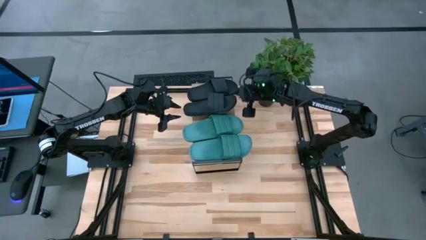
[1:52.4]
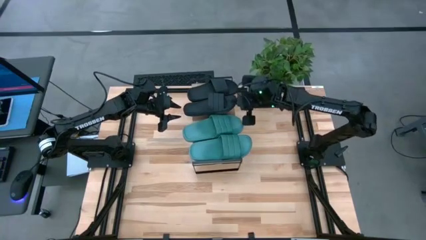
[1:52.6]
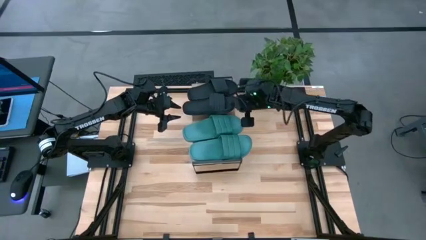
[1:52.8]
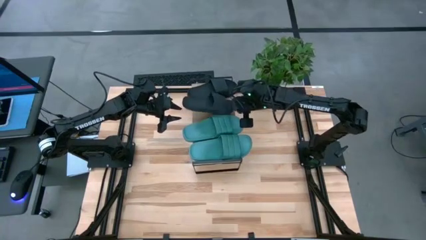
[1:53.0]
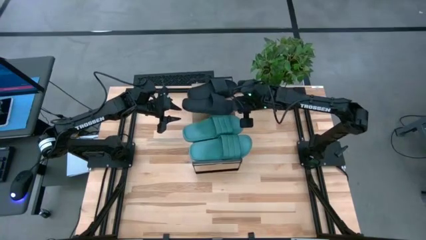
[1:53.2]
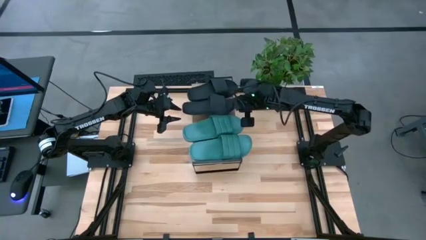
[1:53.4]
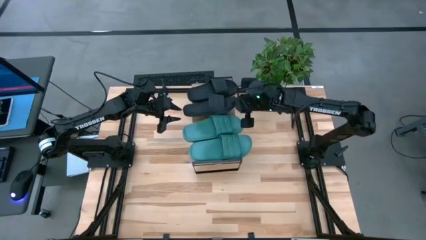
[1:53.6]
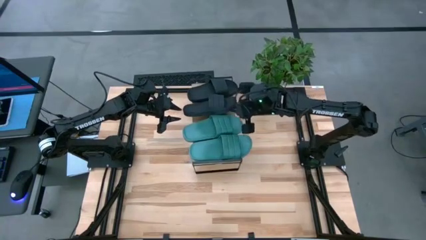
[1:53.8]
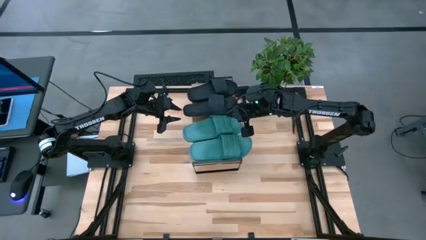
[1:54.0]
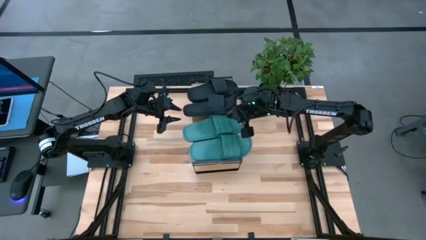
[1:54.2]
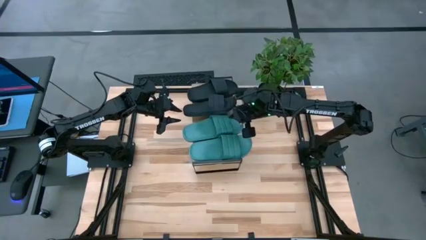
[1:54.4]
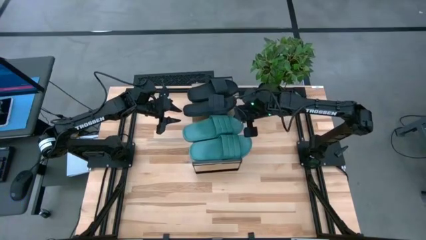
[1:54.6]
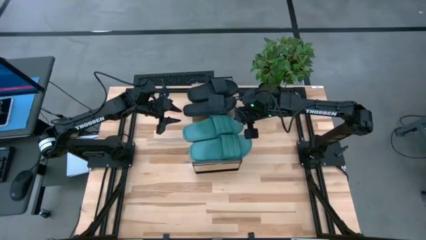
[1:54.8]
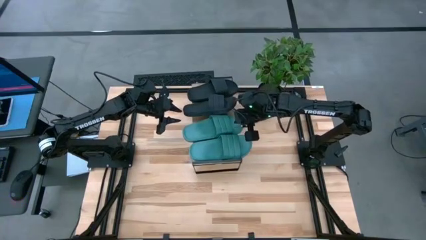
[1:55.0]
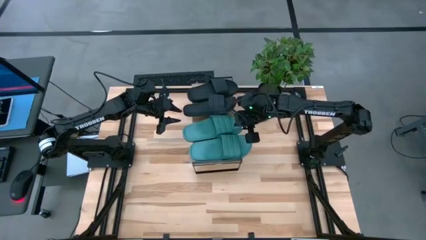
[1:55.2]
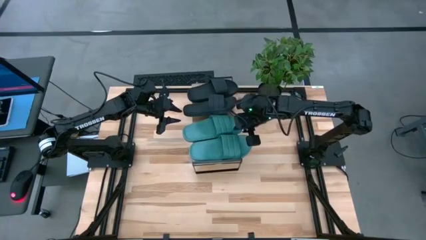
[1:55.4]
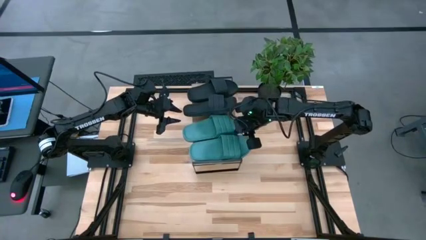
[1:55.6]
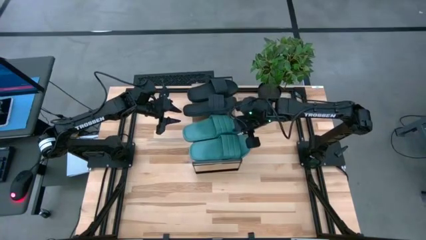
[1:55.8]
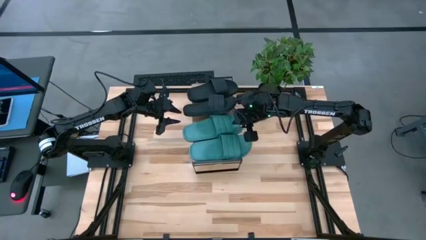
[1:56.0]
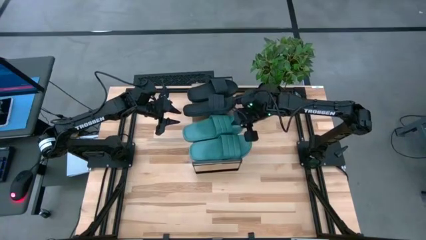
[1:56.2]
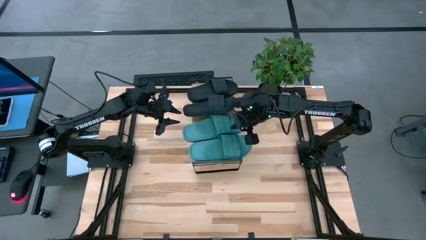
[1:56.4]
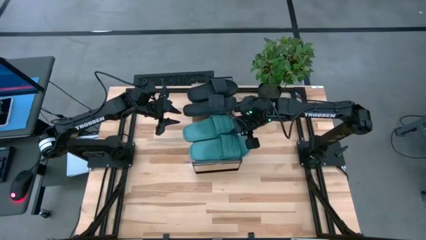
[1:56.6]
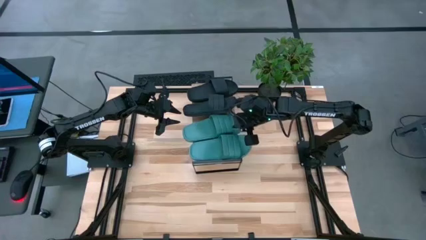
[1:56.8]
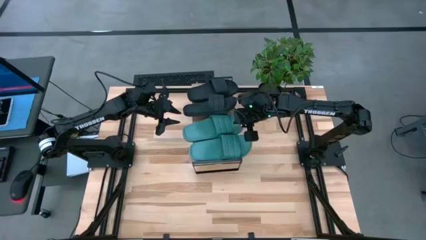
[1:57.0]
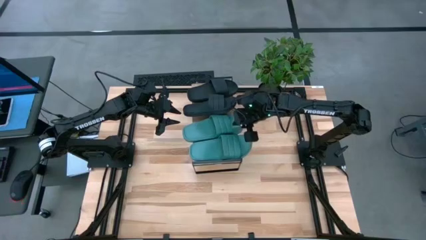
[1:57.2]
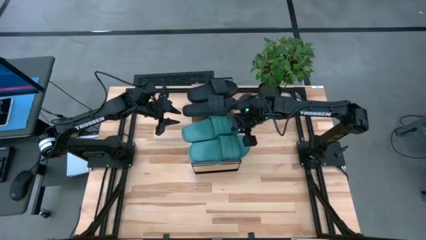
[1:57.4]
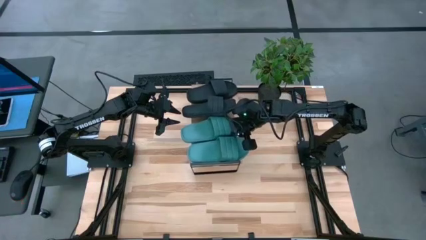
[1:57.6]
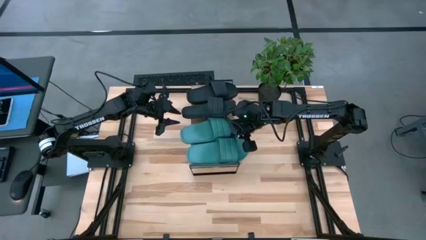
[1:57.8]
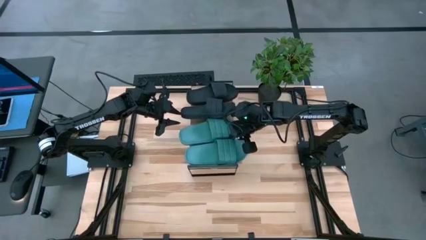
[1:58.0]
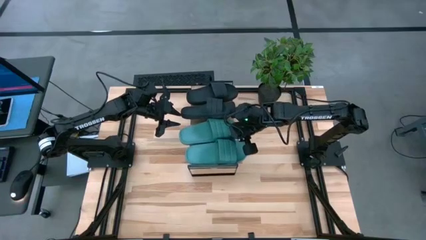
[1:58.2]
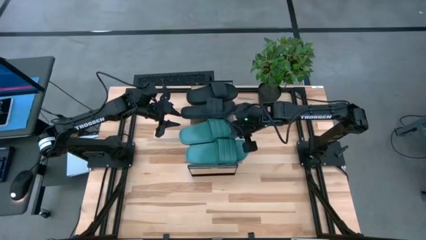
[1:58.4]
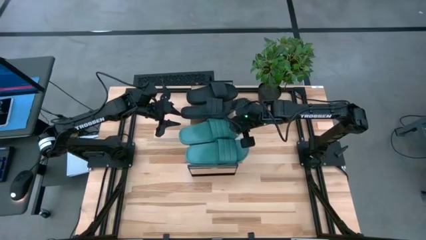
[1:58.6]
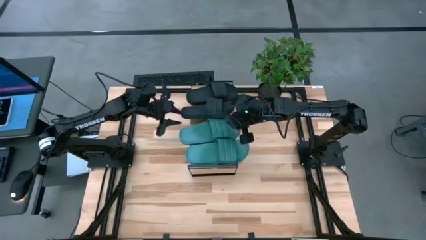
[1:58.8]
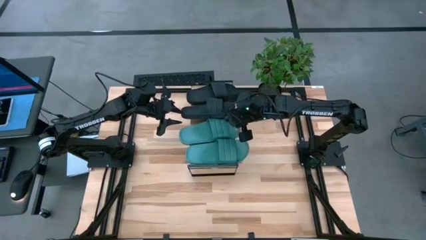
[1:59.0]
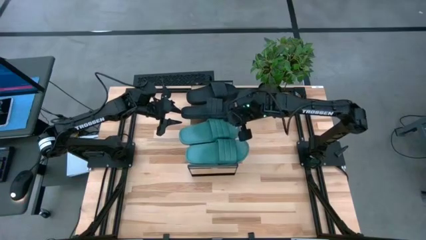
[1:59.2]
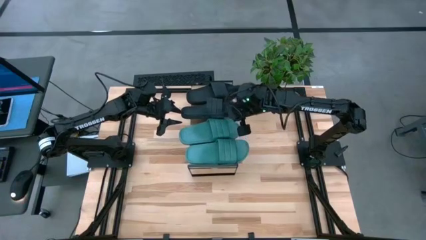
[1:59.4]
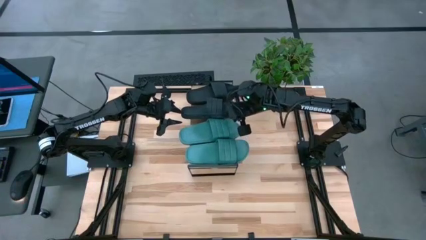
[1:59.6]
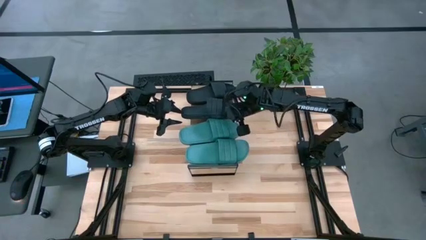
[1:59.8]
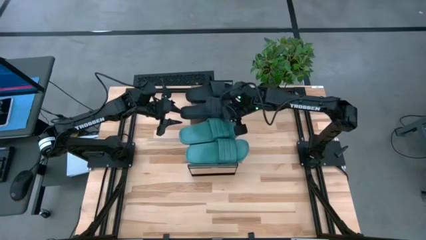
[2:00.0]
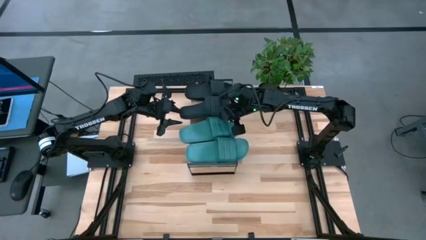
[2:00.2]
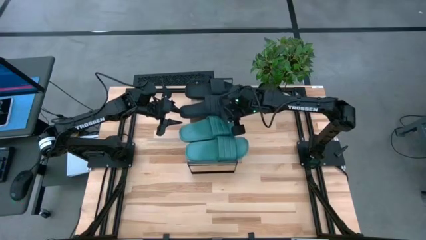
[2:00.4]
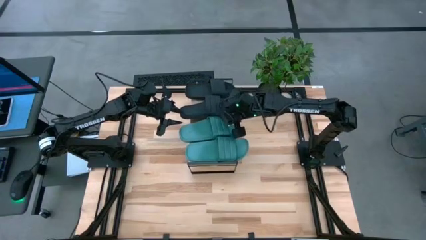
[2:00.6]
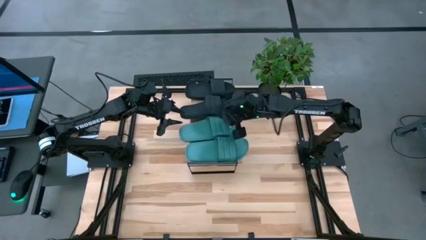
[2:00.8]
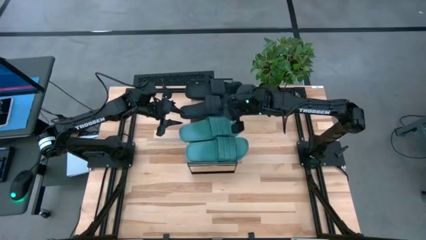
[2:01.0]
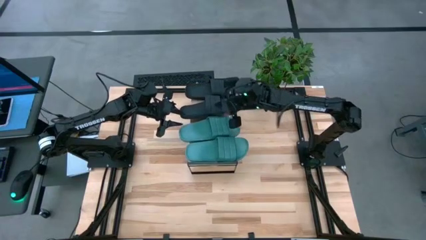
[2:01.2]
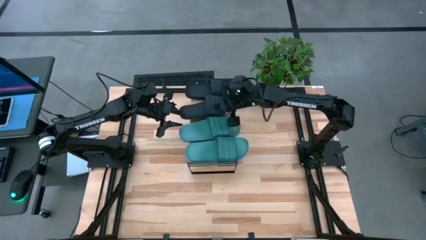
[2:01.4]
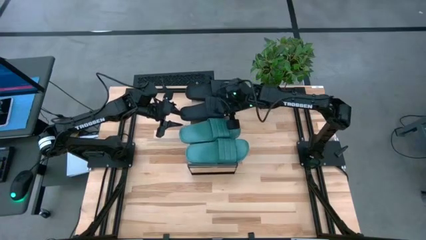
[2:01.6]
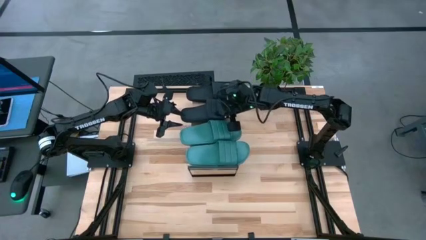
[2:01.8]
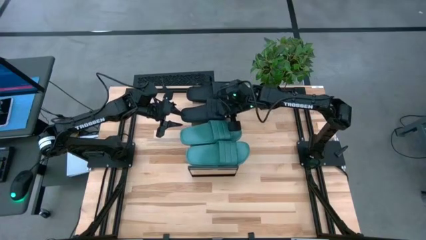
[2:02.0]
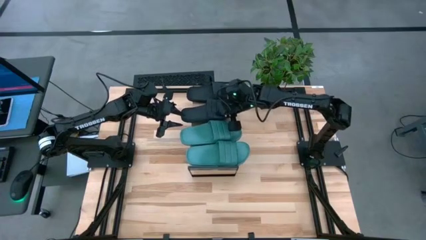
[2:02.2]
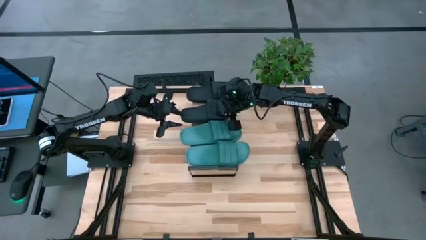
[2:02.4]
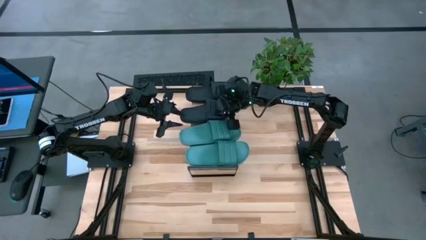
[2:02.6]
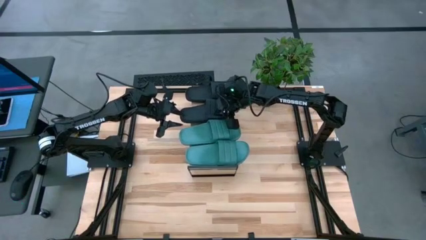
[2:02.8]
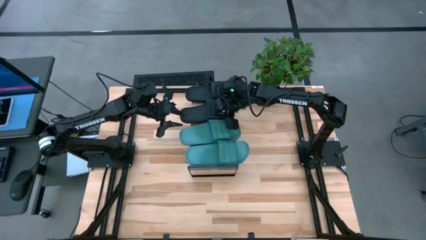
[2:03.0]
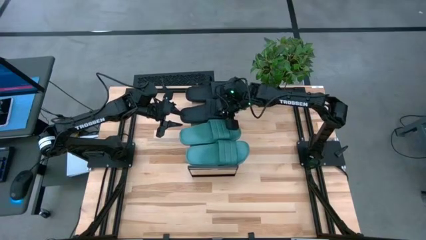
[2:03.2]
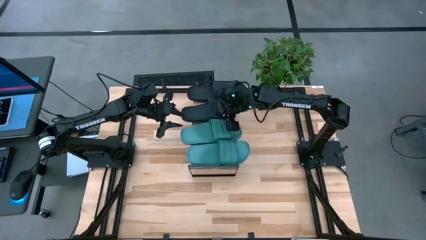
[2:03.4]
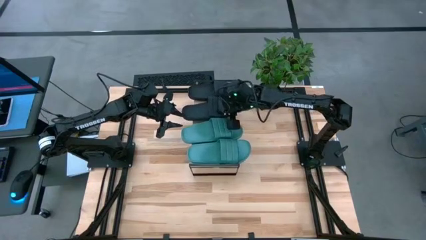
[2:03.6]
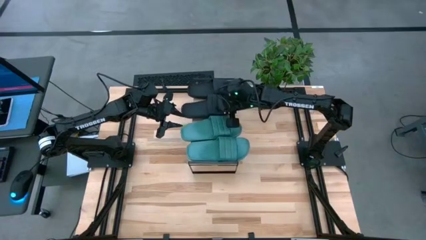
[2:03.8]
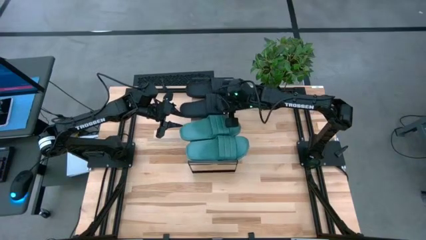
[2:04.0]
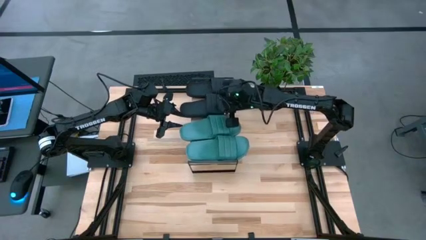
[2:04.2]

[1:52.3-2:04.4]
Task: Pick and place slides into the shelf
Adjust the slippers on the shelf

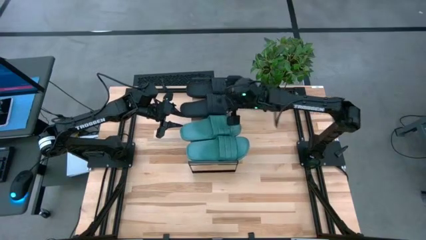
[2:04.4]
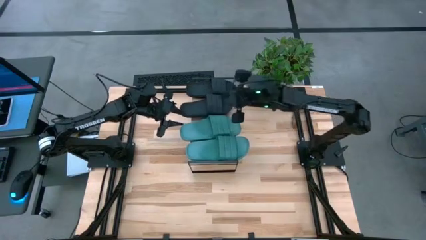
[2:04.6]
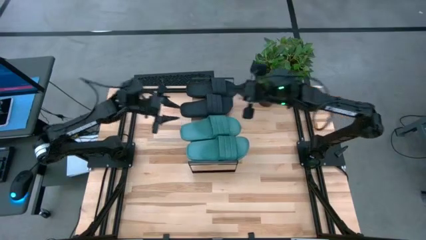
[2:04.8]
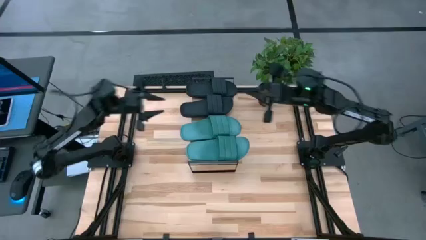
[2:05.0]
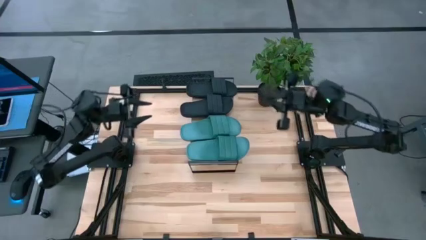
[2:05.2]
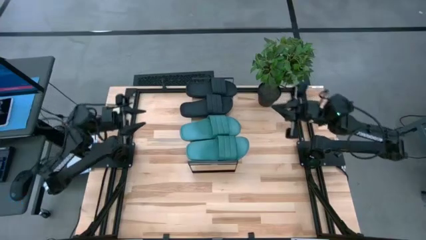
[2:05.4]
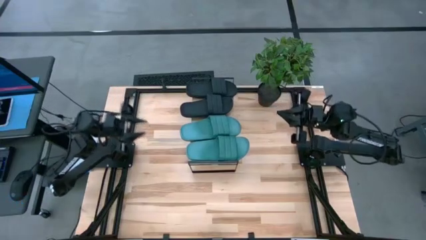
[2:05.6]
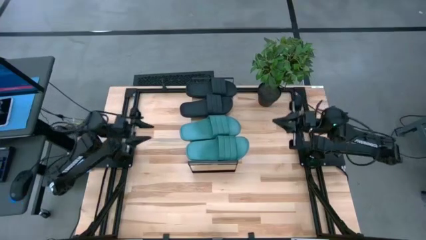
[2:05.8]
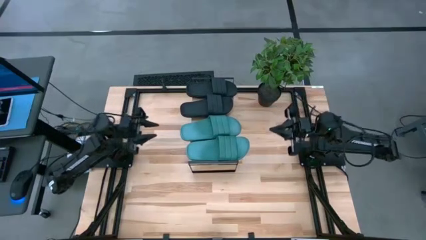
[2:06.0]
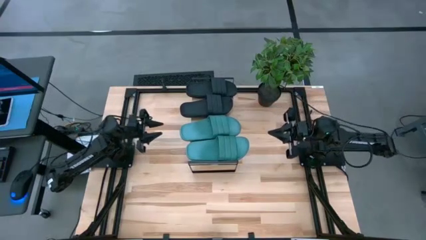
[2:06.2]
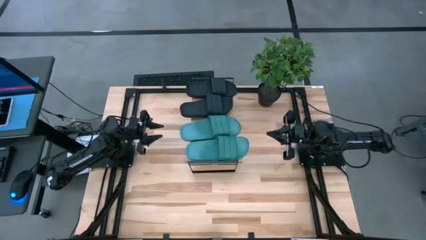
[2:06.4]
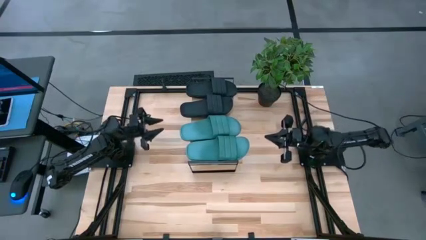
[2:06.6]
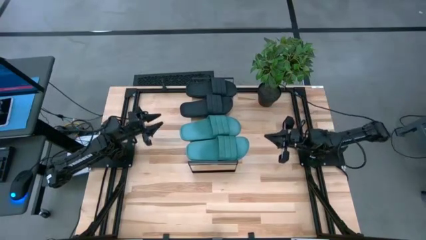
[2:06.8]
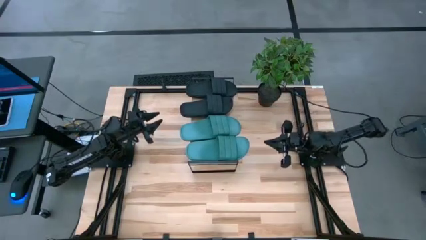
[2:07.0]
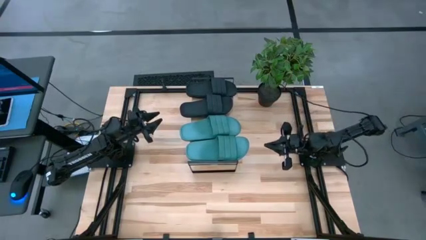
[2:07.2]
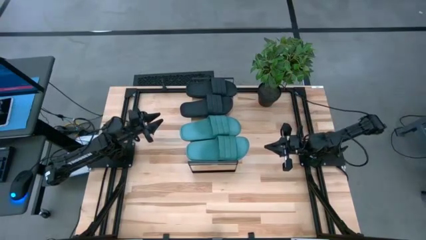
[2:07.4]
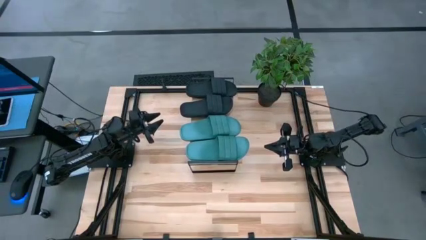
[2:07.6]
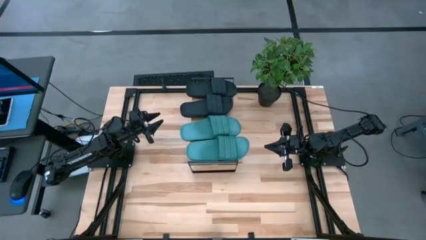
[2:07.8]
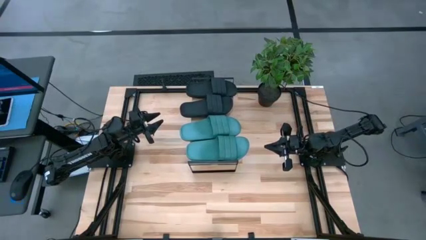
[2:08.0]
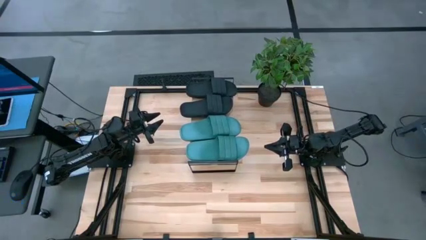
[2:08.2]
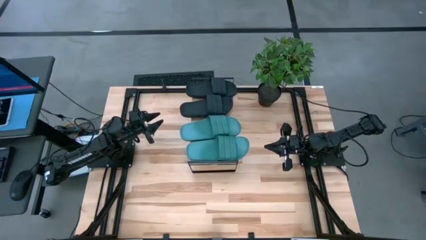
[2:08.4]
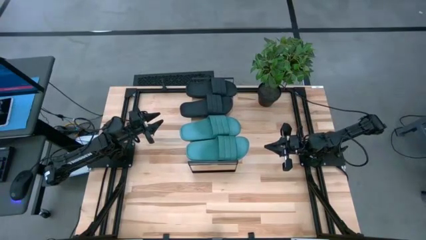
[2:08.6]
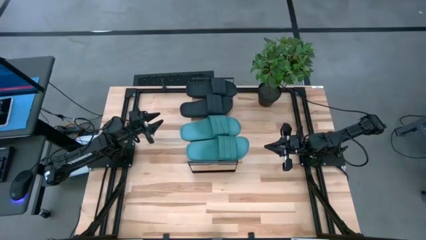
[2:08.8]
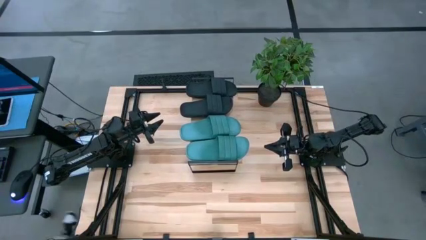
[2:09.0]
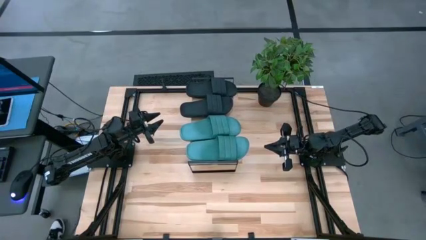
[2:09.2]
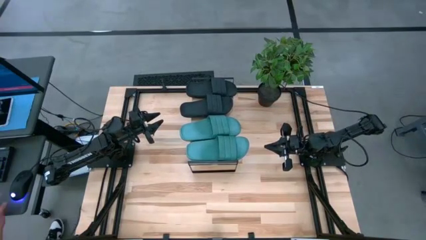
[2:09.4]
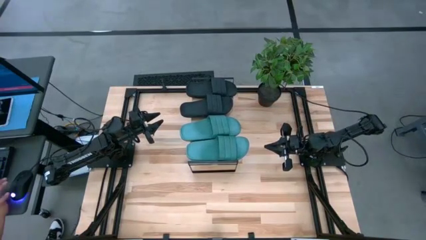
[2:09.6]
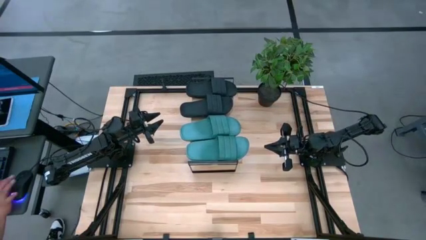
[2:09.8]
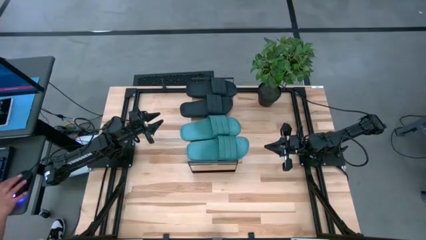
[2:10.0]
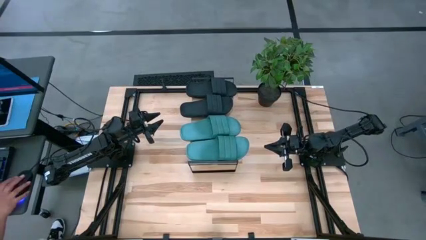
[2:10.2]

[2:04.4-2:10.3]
Return to Home Position
